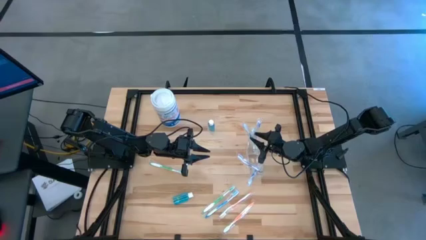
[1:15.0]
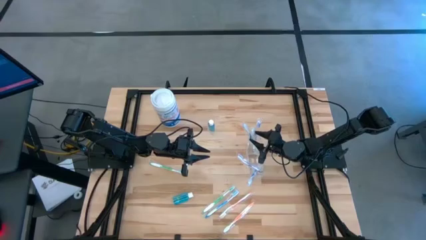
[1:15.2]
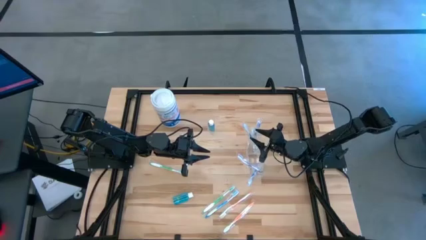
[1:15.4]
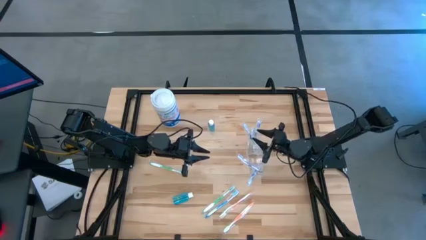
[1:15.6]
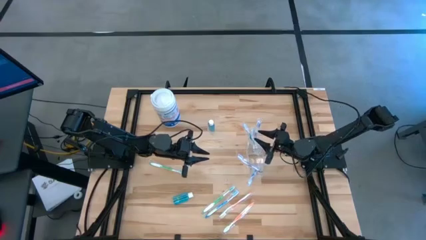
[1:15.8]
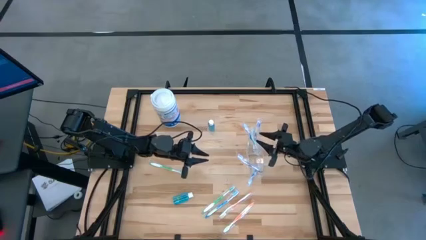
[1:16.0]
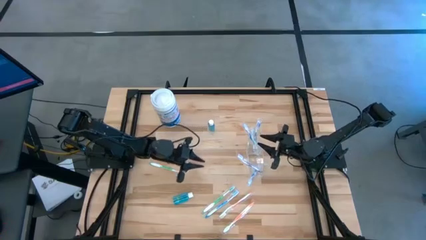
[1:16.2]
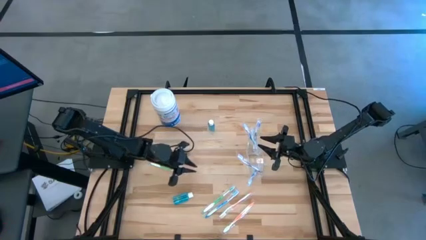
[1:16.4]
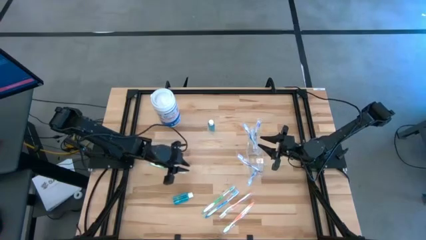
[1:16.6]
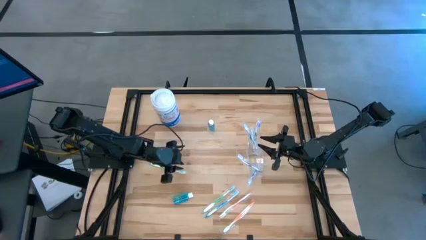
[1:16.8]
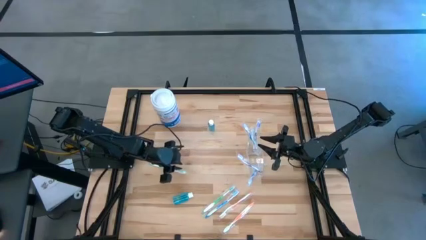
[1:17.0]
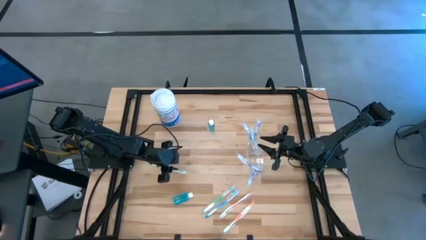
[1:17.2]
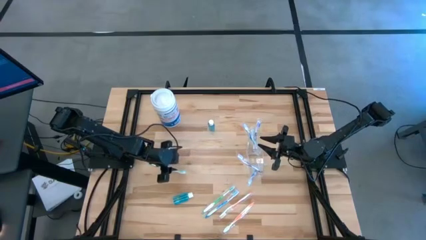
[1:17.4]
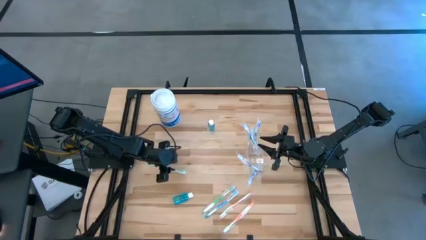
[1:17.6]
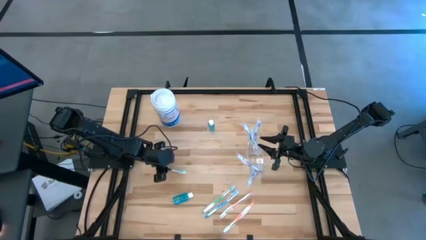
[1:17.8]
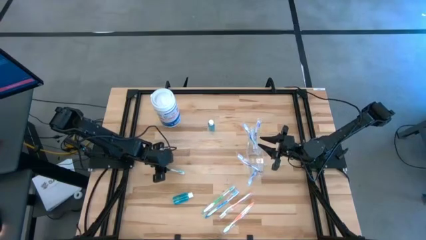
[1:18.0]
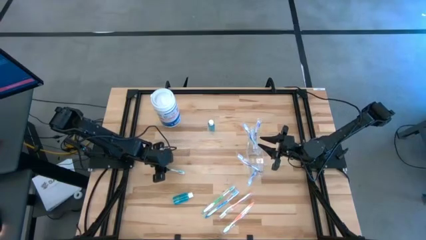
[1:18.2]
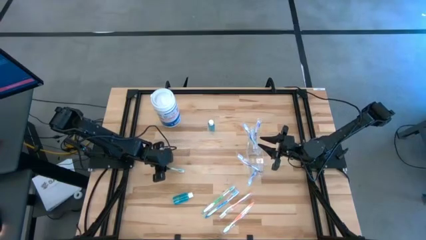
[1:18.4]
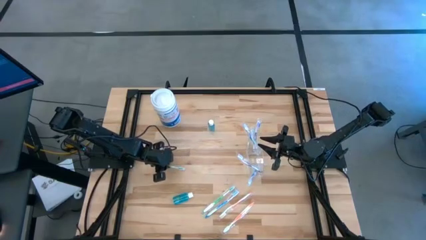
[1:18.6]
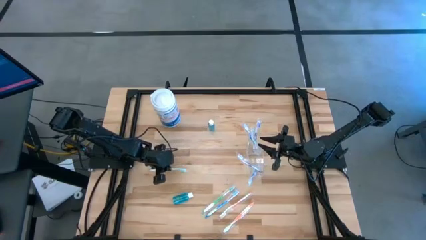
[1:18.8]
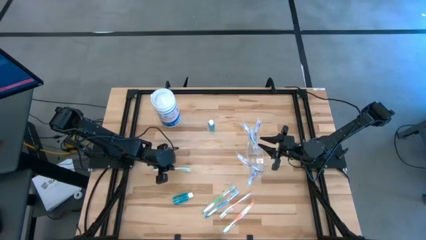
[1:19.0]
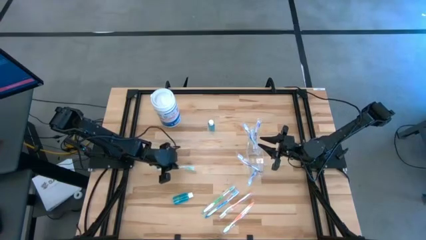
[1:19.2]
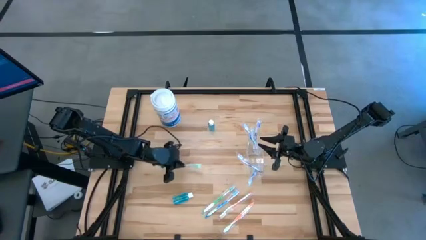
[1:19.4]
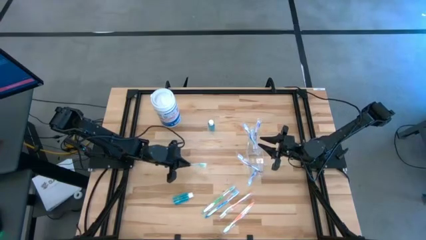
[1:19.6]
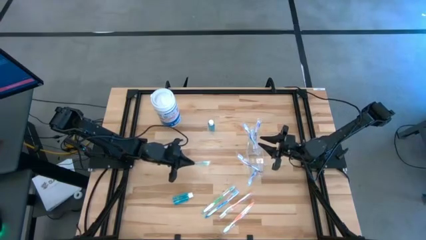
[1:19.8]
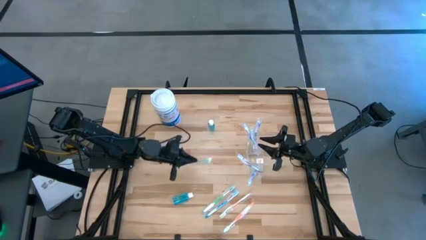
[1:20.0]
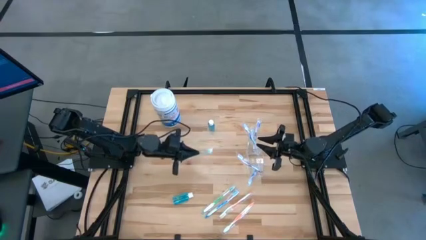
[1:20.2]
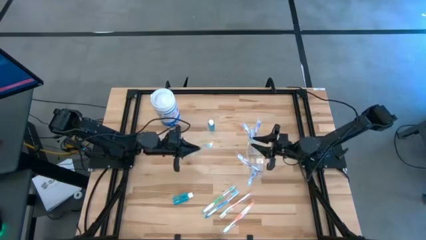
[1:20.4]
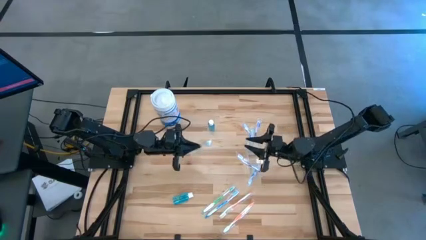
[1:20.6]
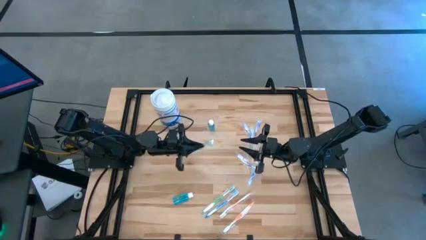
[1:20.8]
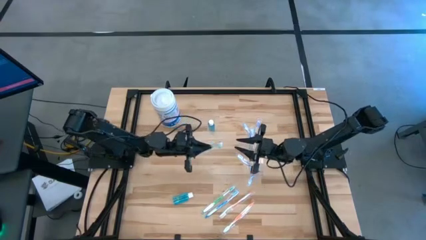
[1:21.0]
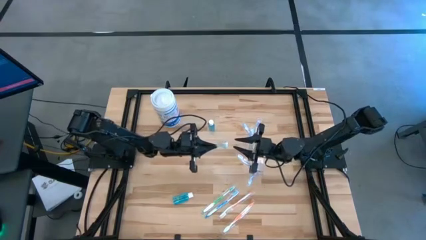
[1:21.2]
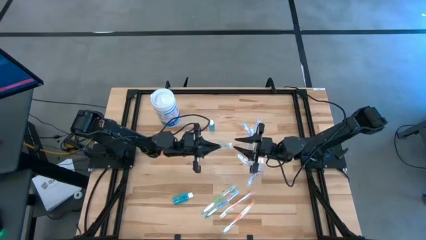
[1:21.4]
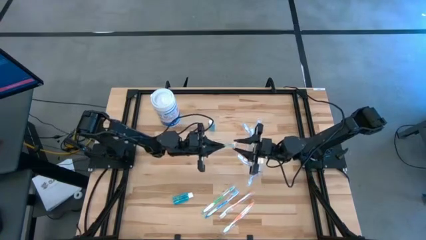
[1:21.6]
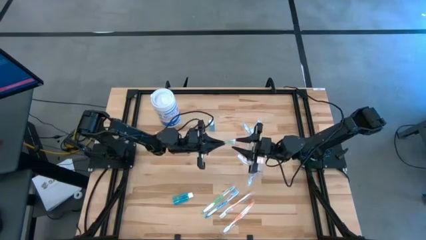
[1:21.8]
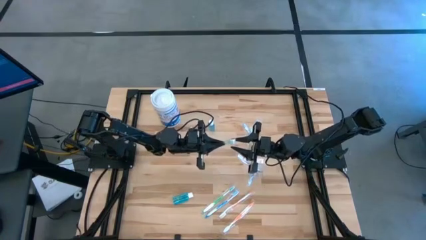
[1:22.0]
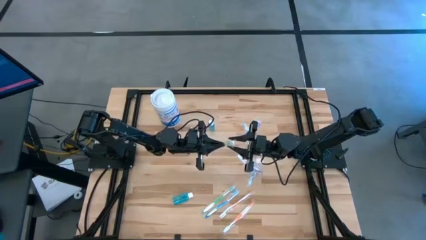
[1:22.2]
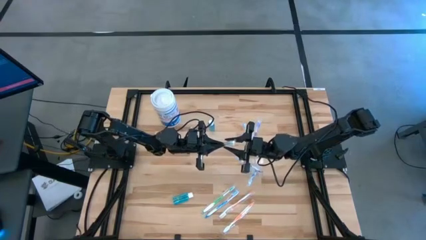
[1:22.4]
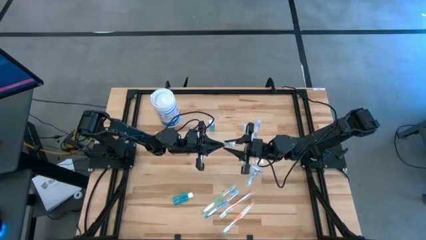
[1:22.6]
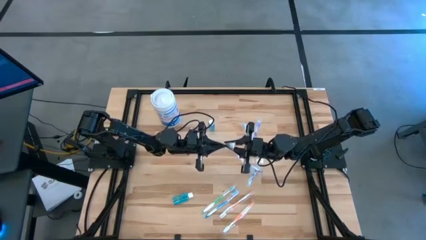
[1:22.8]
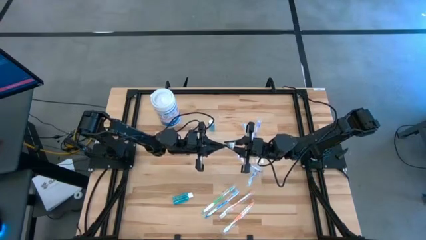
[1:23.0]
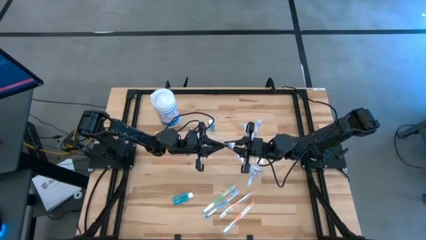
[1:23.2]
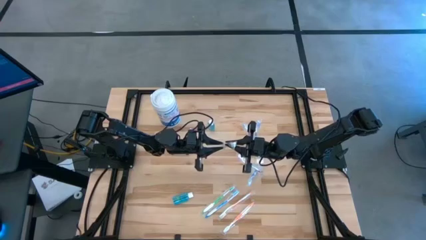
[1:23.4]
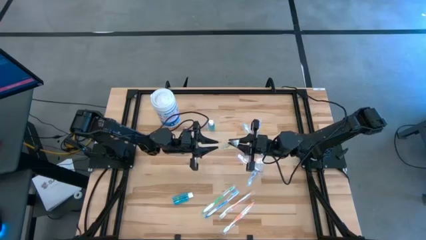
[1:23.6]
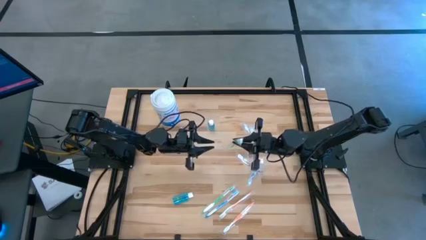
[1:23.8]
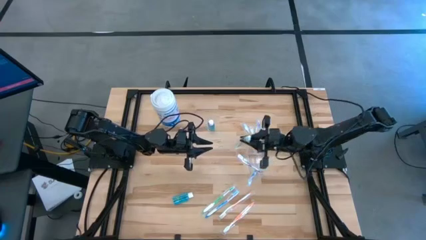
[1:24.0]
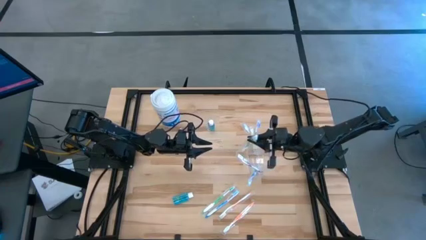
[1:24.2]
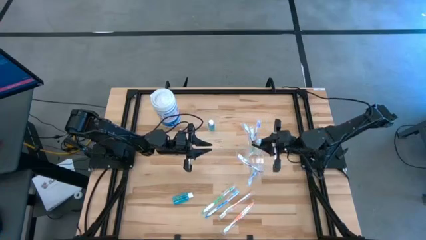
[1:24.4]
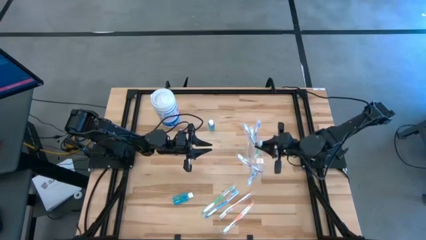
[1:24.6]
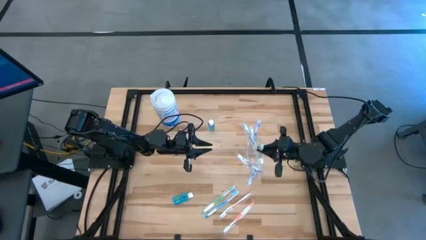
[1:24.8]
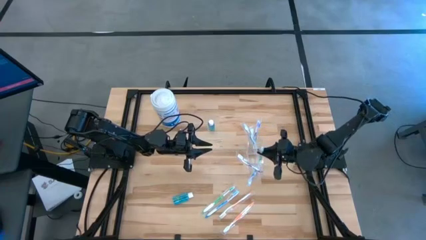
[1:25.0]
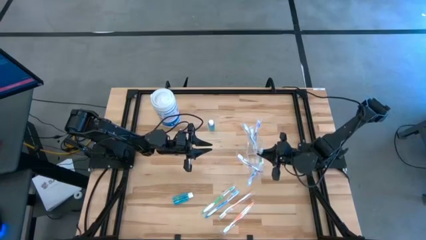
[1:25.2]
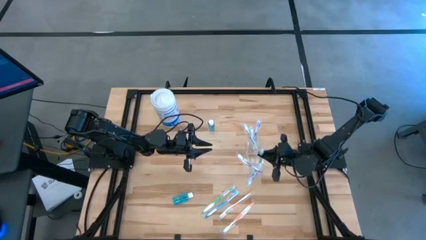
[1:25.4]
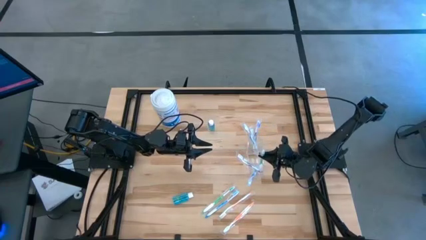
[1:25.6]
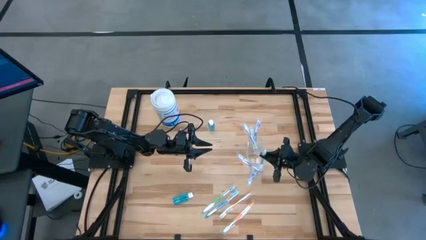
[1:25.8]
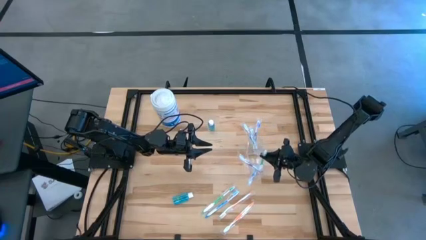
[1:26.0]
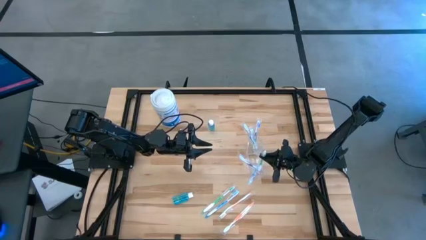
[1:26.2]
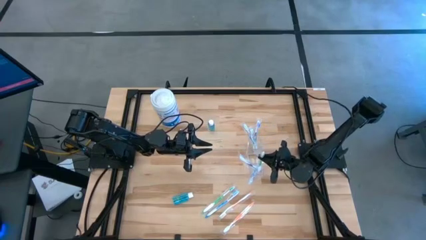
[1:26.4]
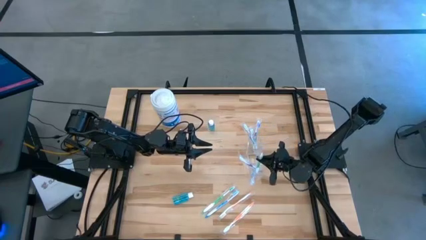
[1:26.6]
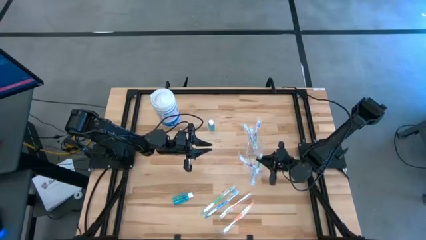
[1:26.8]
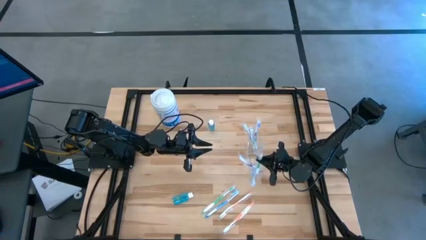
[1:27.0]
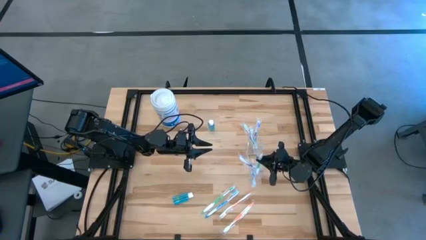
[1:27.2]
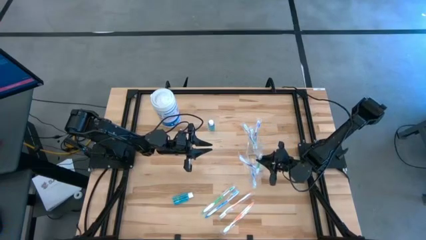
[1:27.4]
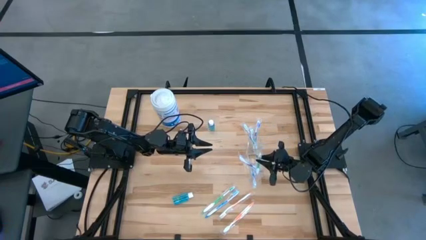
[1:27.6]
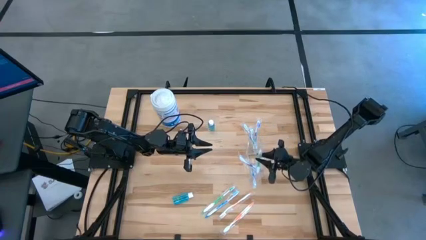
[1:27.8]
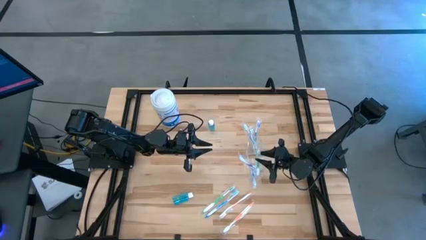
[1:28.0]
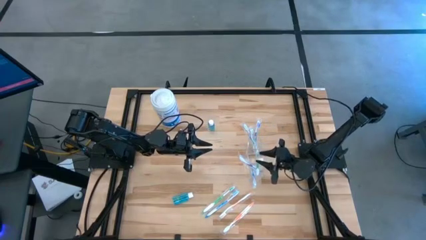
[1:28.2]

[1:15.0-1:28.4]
Task: Pick & Place toothbrushing station
Put the green toothbrush into the transparent organizer

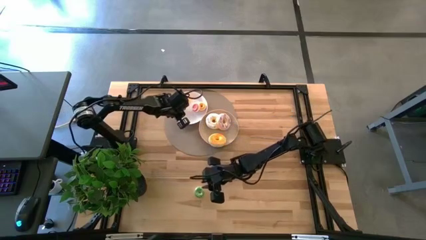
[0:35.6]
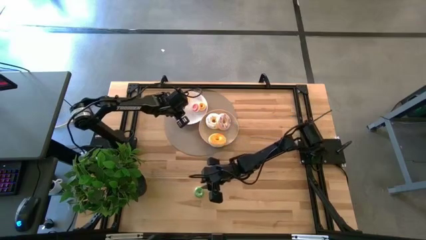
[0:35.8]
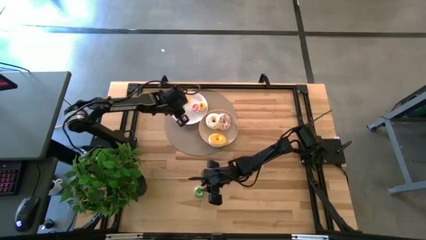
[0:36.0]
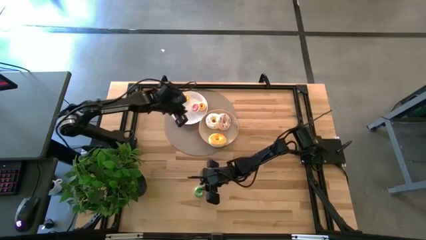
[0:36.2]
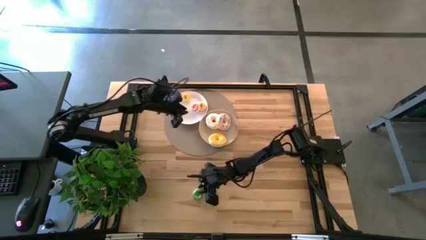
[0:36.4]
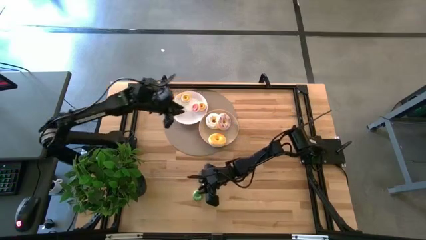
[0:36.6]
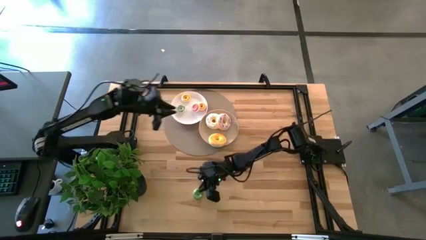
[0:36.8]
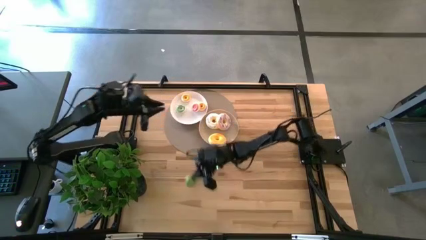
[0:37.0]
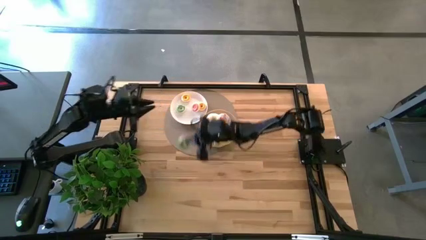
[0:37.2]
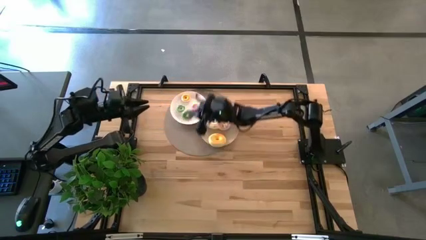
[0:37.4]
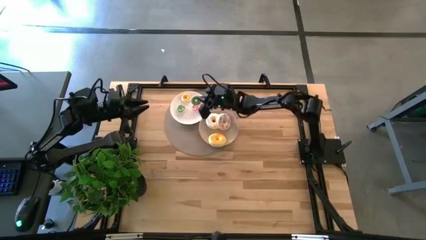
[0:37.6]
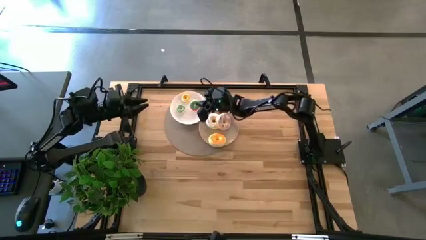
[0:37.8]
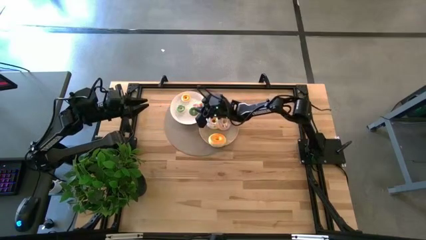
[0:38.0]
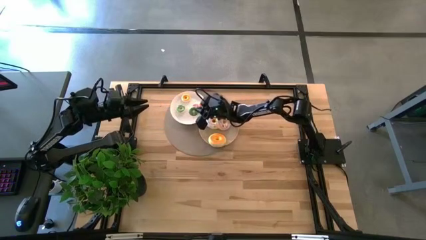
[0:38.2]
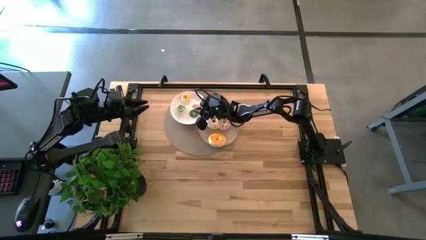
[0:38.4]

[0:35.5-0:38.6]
Task: Pick & Place donuts
Put the small green doughnut on the white plate
